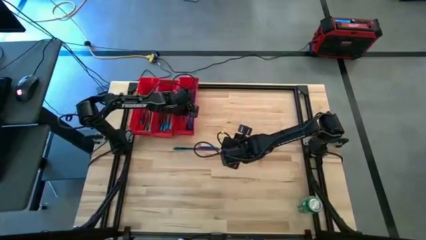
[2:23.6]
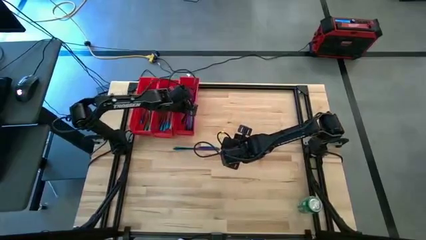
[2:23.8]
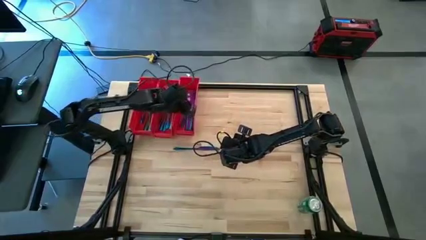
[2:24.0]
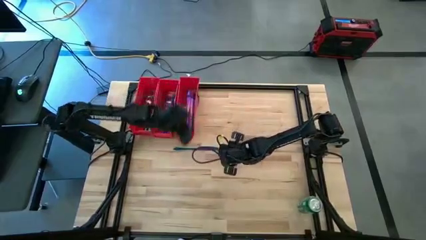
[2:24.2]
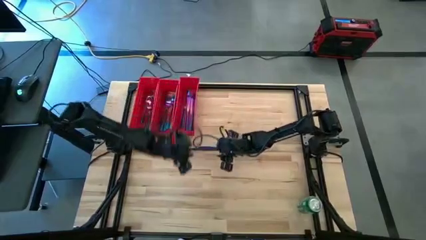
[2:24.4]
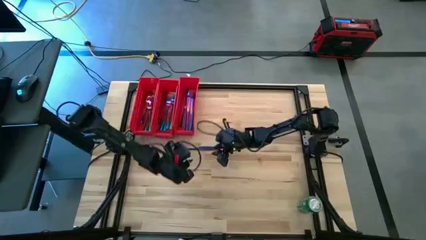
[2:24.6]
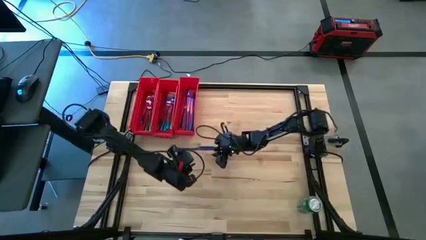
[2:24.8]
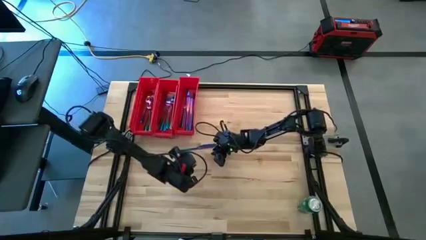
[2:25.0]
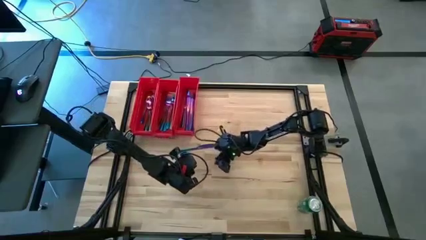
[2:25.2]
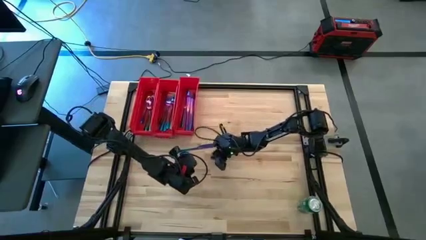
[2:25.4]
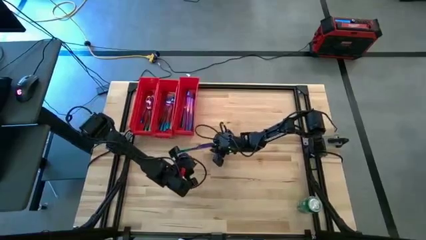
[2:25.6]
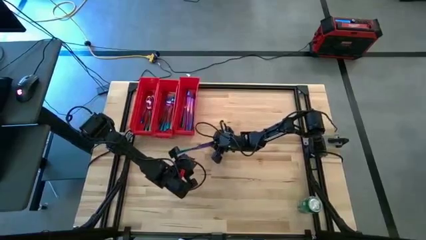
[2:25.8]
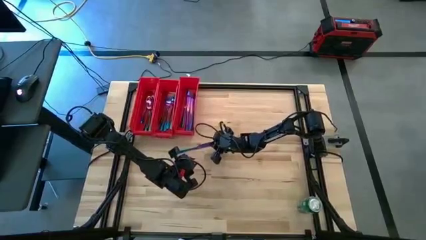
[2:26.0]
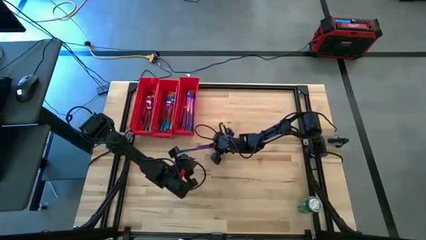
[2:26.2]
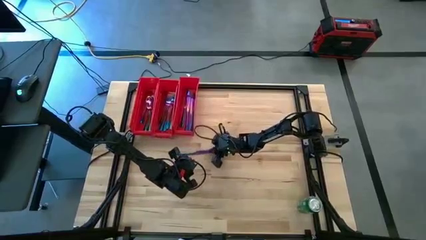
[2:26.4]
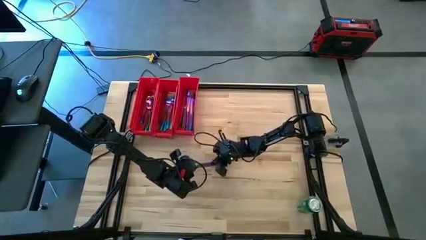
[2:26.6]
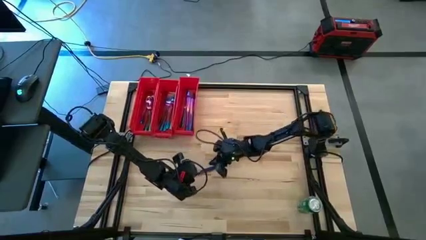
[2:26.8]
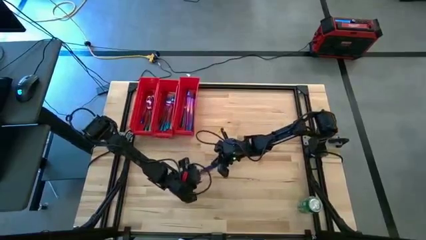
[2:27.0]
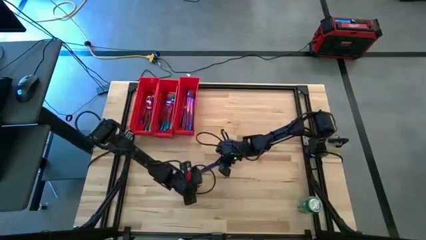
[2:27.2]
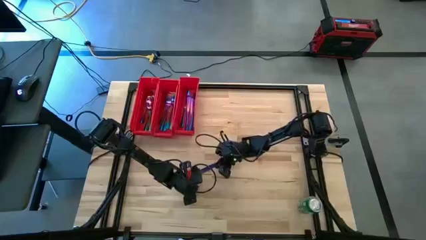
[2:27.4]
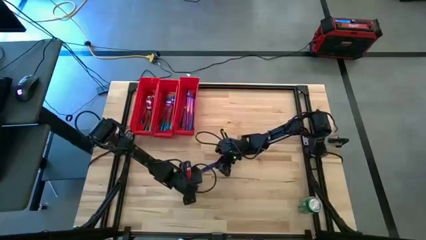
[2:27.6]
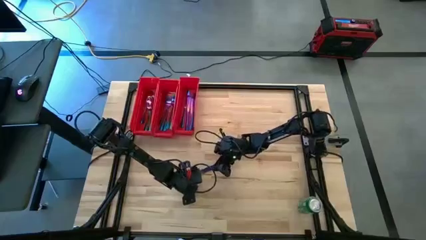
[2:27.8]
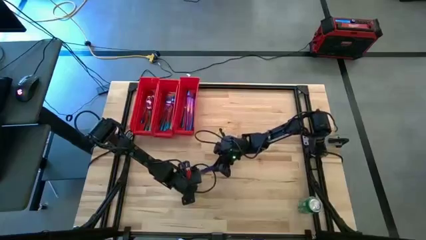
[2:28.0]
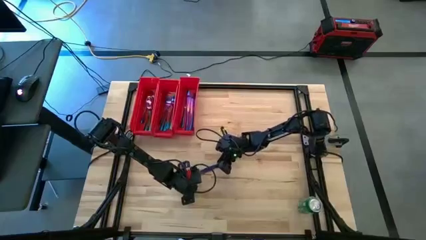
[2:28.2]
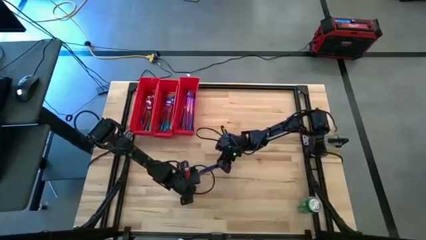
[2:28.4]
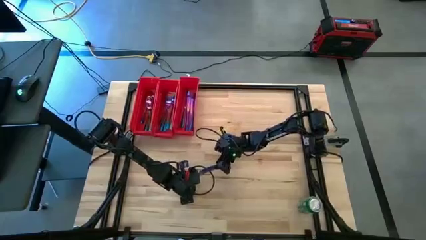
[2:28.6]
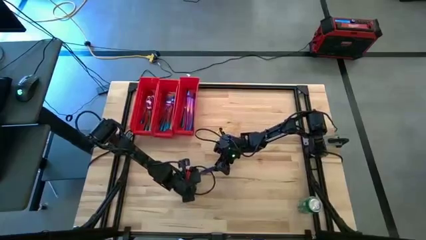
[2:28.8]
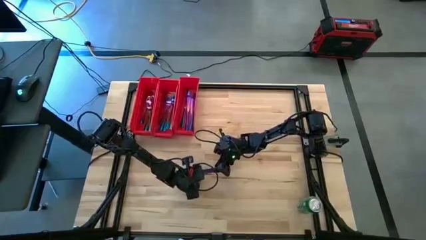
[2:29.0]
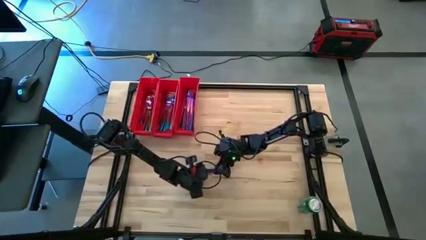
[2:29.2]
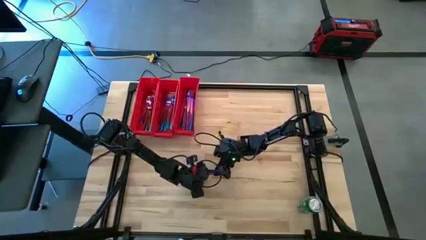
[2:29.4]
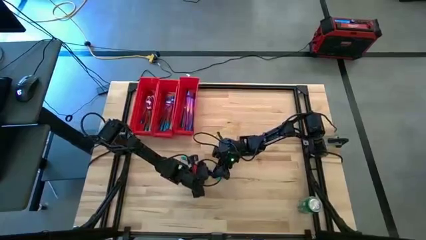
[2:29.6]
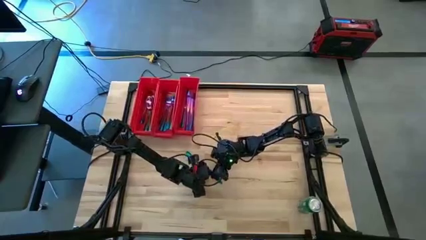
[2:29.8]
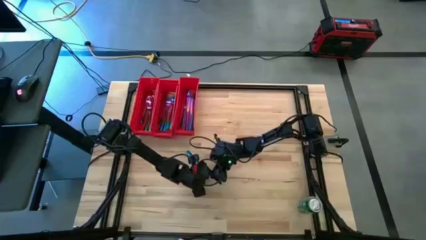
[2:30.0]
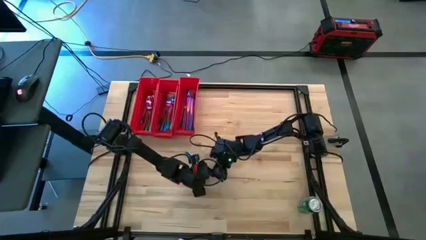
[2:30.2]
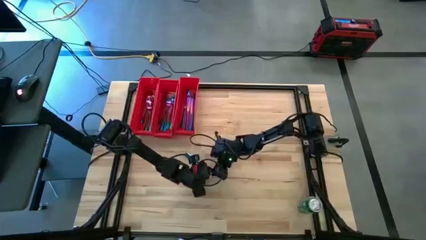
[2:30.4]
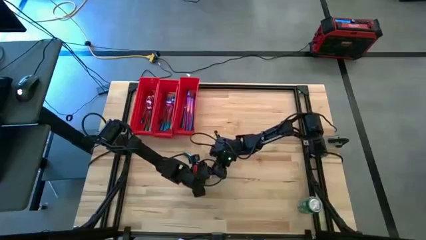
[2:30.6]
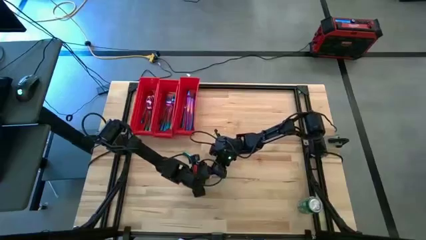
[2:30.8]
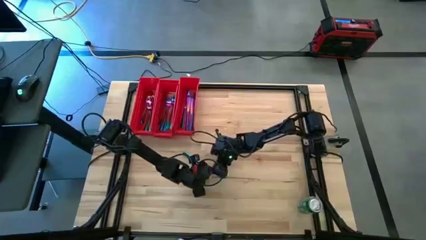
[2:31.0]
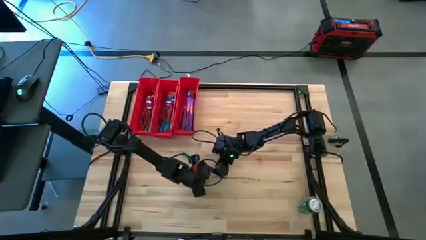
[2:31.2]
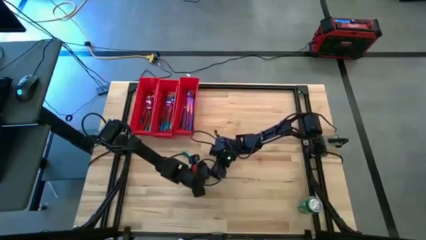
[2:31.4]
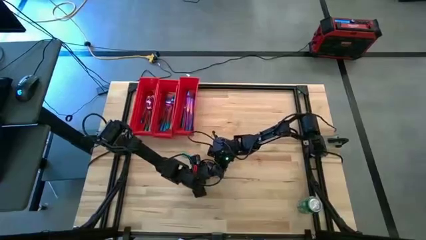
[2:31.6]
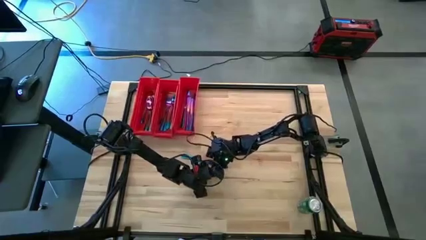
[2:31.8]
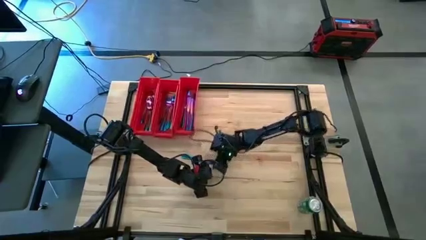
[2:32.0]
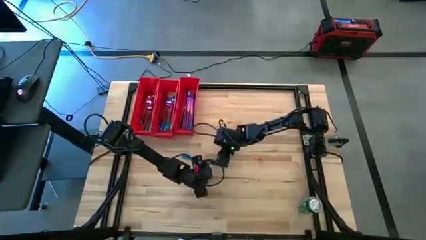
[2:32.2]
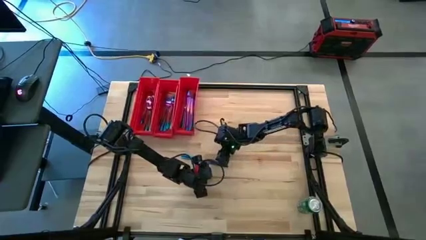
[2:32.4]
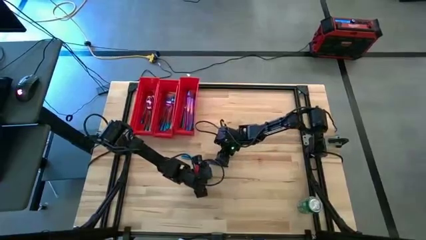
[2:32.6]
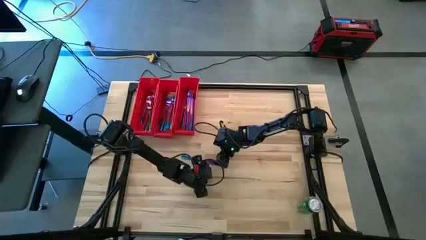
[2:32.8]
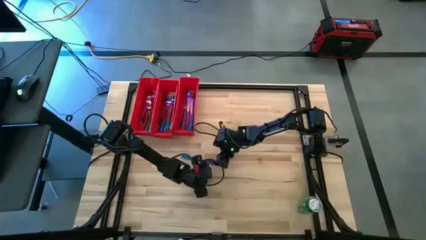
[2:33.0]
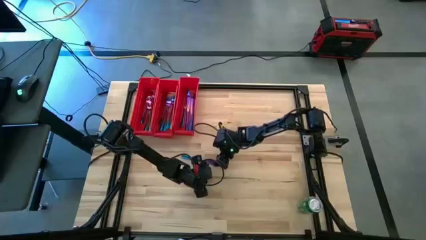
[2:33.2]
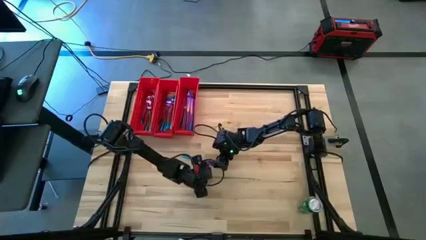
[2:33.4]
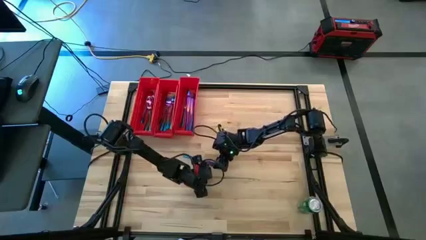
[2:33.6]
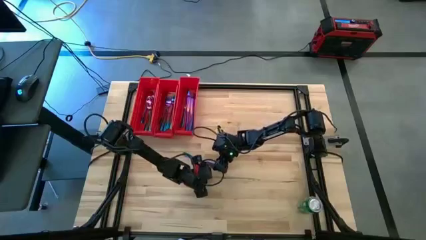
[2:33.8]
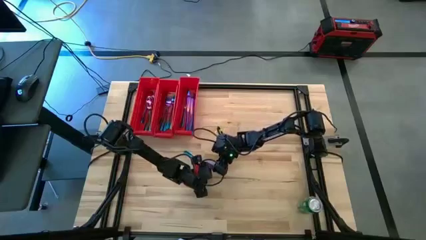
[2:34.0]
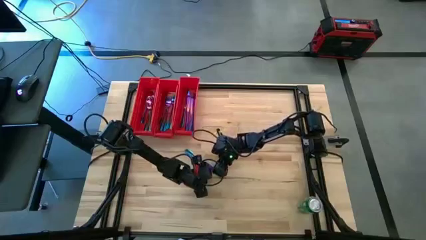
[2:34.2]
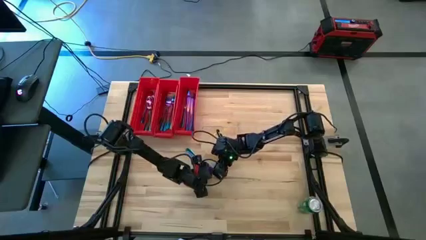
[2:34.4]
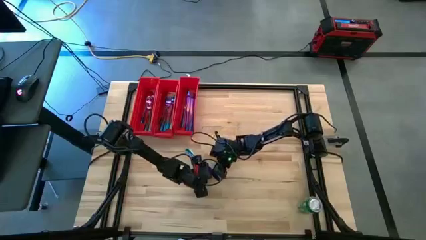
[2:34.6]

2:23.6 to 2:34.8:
Task: Sort silverware
Put the blue knife into the right red bin

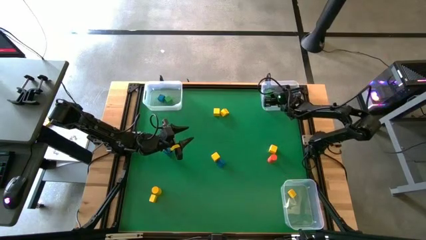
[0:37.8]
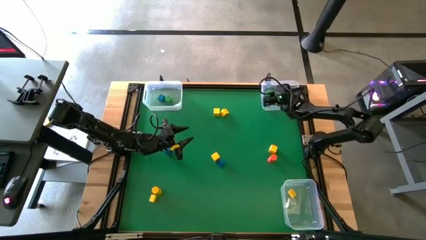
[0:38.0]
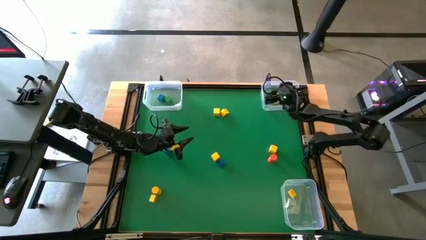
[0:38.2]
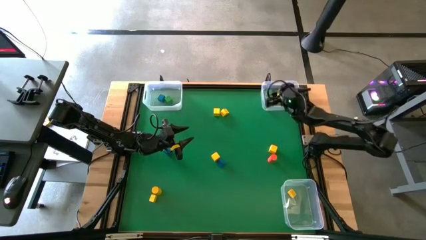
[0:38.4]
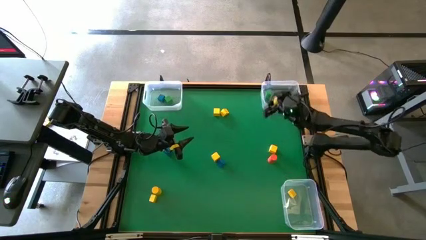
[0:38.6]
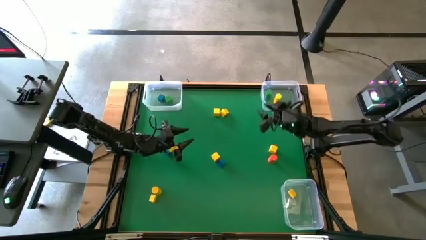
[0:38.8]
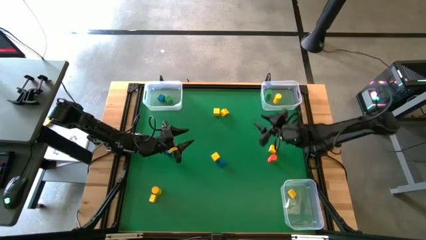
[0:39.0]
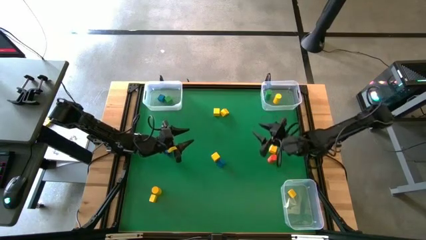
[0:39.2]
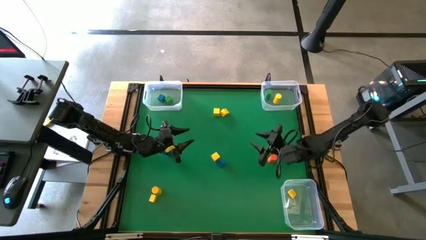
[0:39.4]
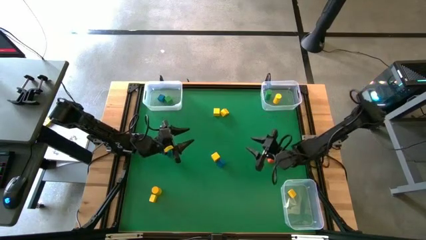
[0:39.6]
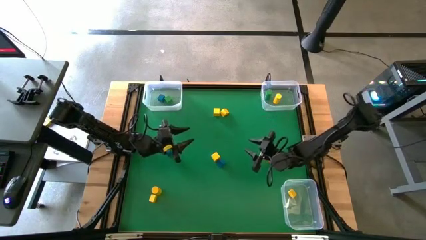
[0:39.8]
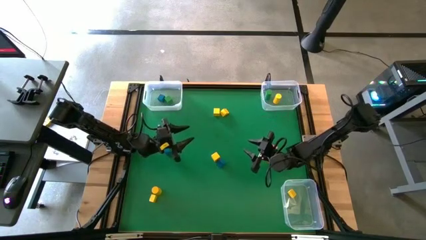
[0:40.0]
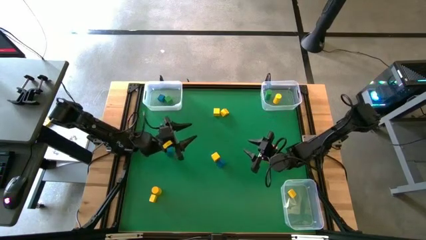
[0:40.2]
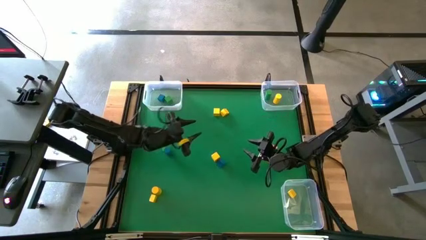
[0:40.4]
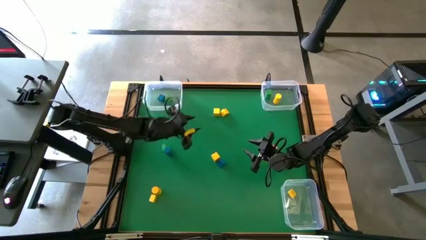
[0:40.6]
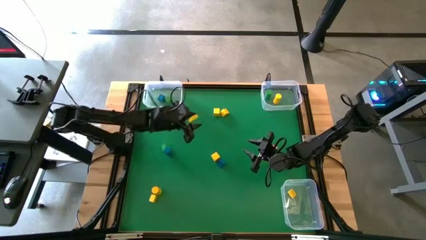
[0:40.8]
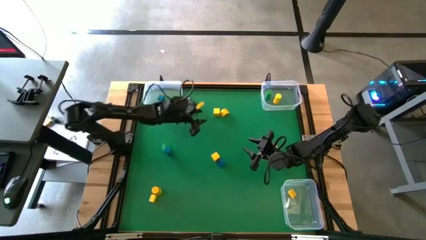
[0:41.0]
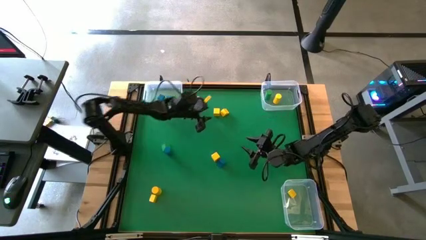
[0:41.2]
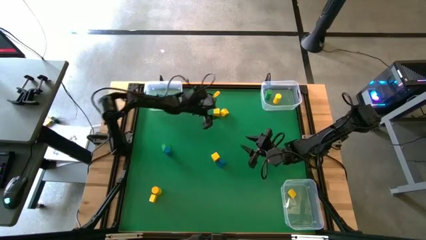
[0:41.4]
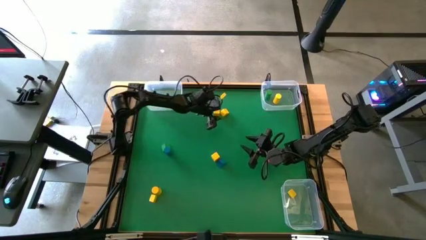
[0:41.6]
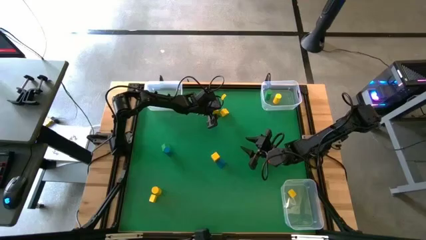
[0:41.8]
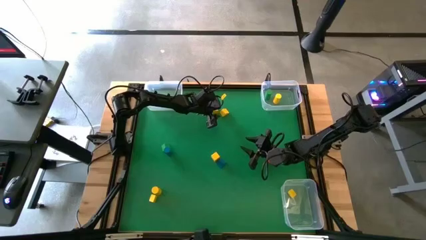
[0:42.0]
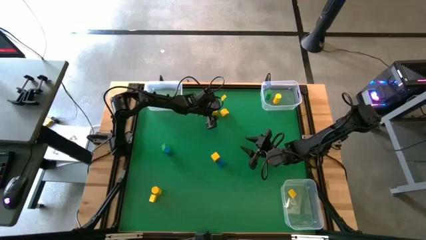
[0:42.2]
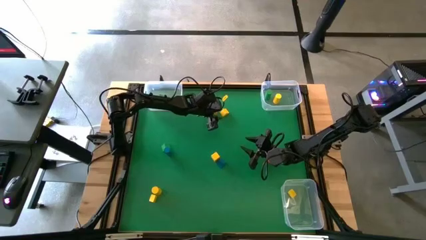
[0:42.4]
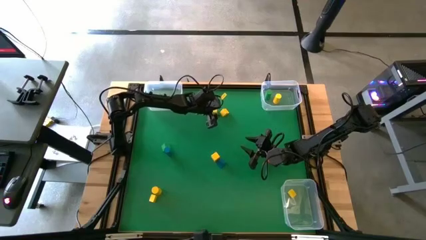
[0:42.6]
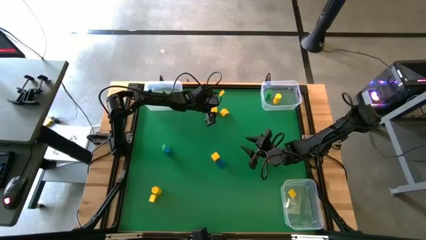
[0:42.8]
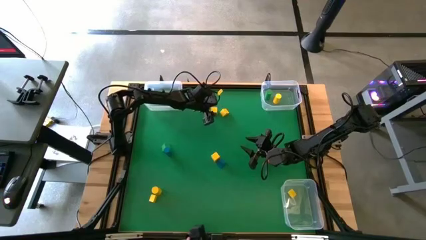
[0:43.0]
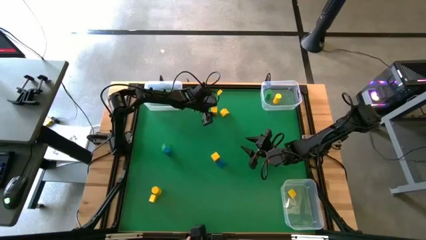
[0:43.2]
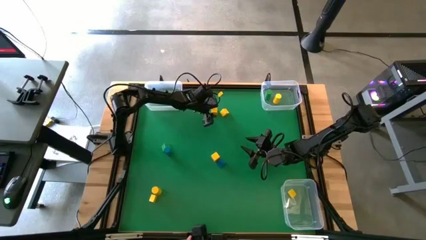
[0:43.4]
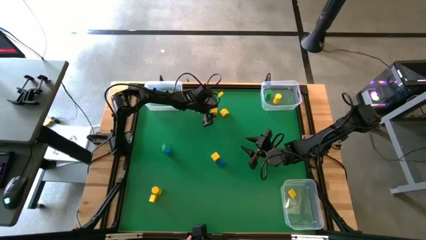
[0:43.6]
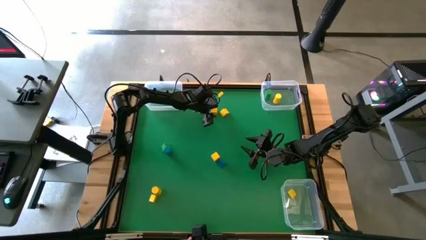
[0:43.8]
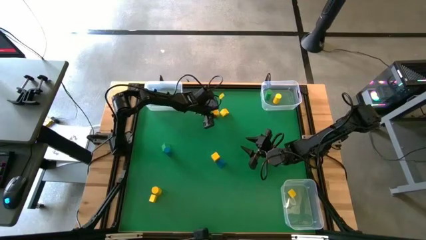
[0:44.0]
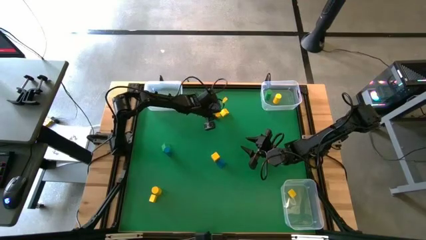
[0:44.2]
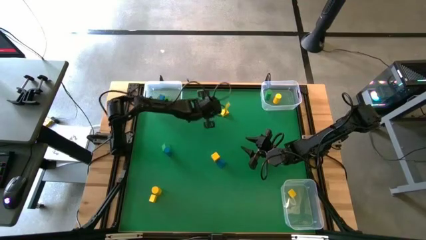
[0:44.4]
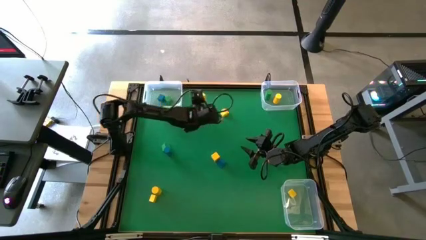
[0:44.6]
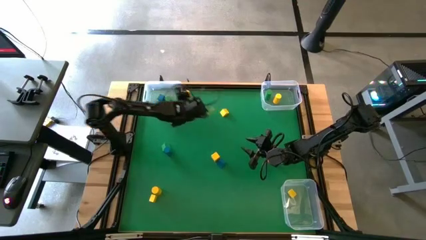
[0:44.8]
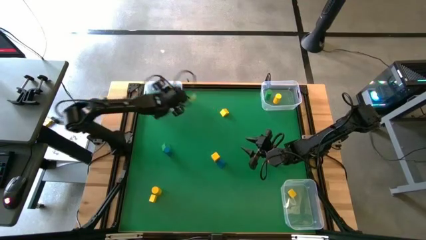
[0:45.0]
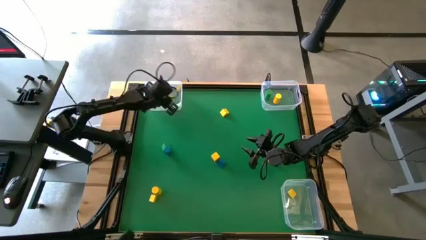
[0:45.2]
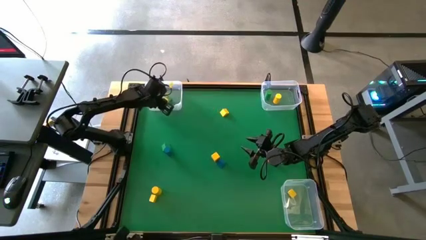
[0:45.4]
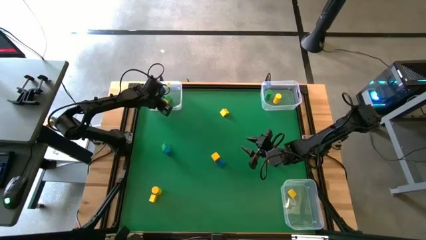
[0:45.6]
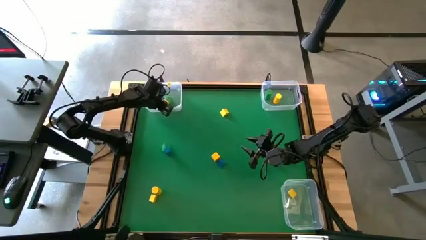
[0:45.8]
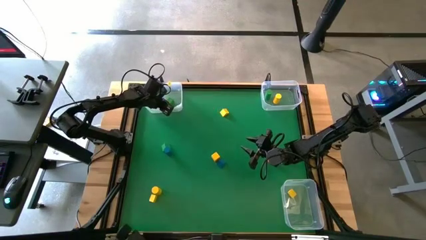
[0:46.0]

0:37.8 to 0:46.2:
Task: Sort blocks by size
Put the yellow cube block into the top left transparent bin
